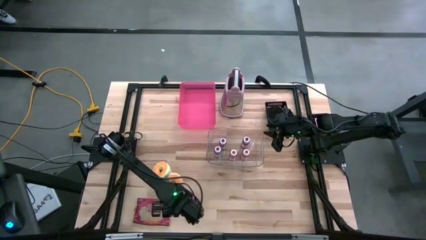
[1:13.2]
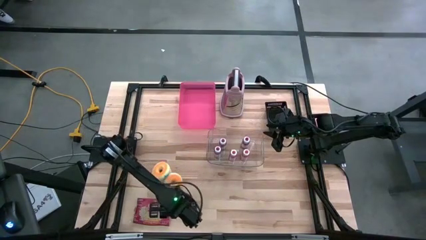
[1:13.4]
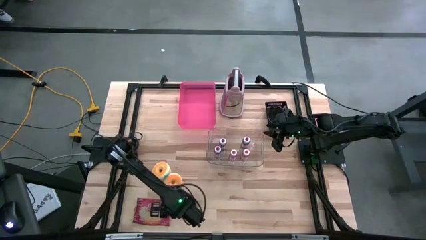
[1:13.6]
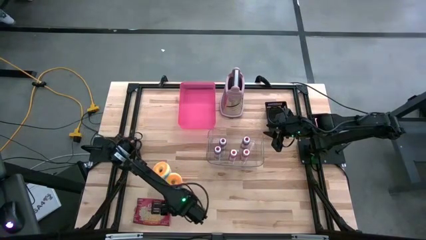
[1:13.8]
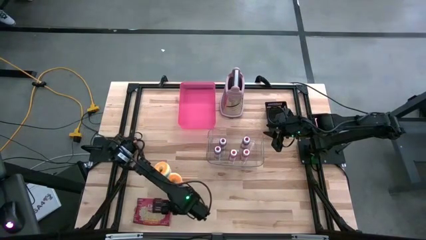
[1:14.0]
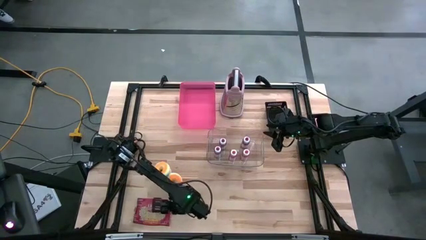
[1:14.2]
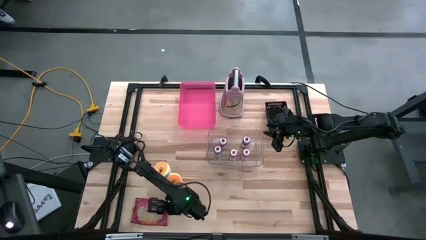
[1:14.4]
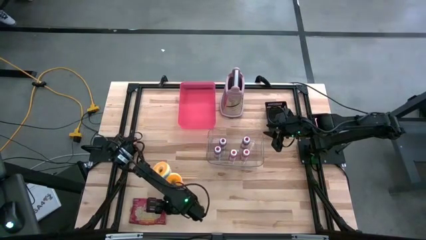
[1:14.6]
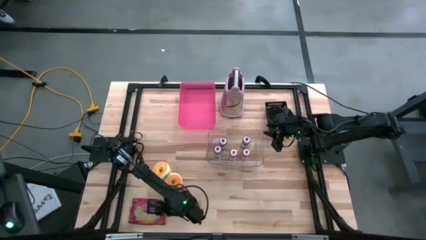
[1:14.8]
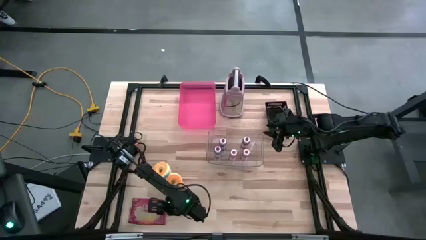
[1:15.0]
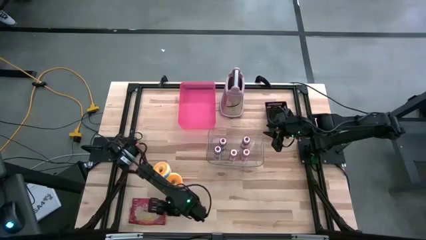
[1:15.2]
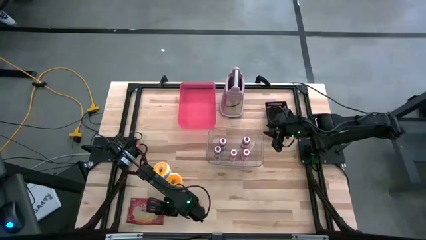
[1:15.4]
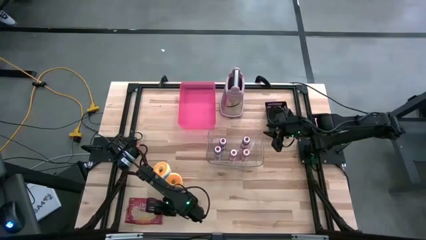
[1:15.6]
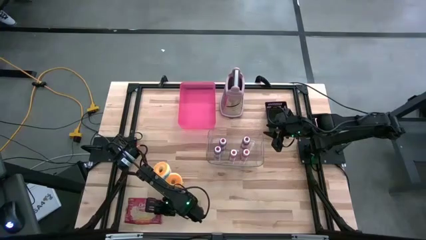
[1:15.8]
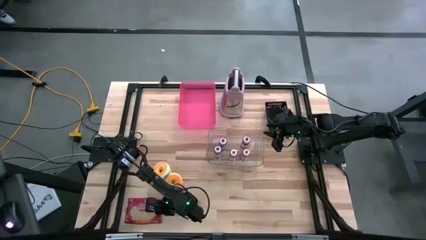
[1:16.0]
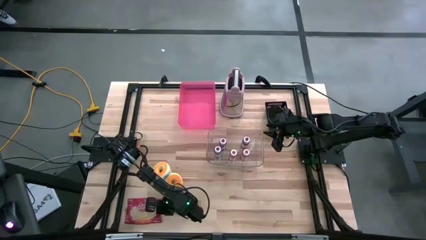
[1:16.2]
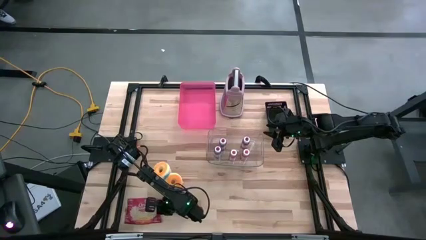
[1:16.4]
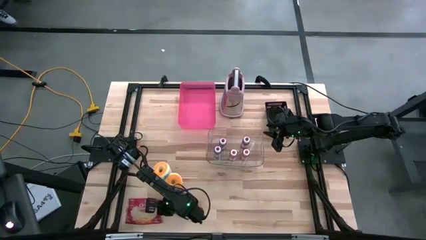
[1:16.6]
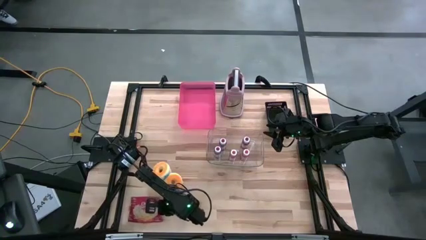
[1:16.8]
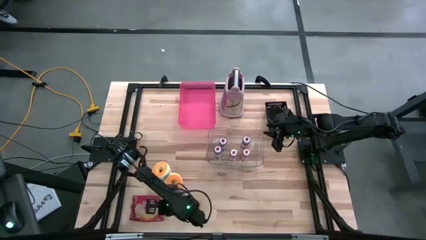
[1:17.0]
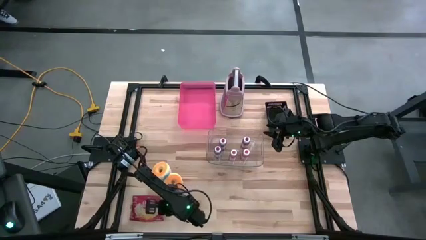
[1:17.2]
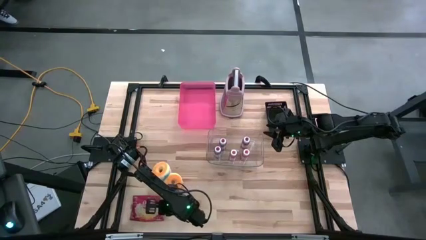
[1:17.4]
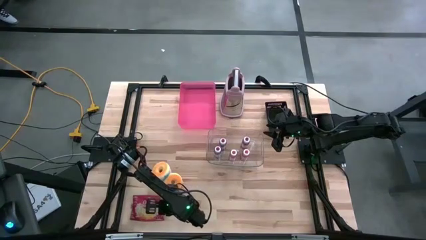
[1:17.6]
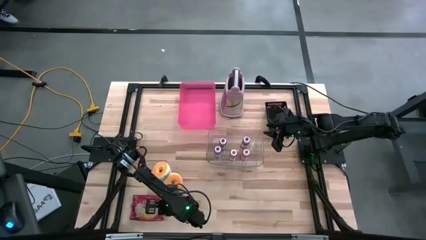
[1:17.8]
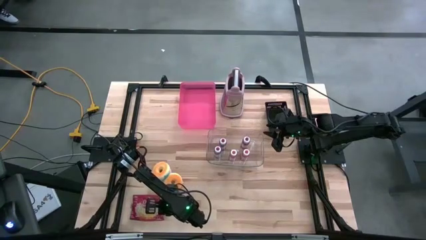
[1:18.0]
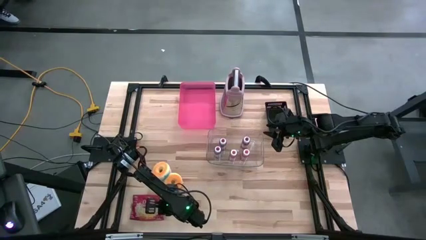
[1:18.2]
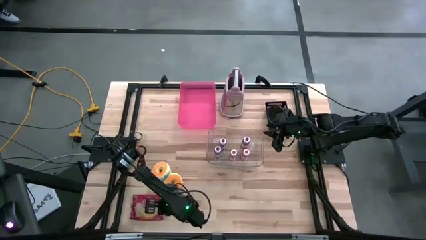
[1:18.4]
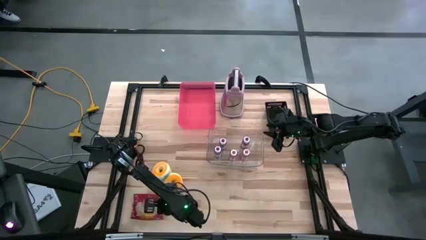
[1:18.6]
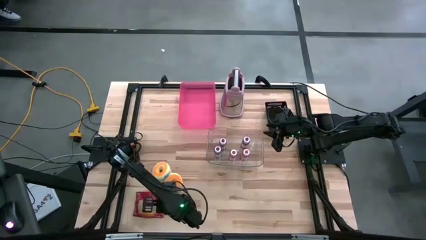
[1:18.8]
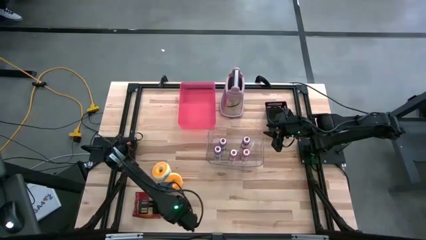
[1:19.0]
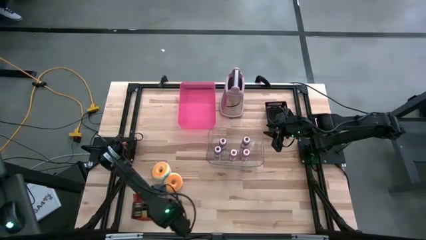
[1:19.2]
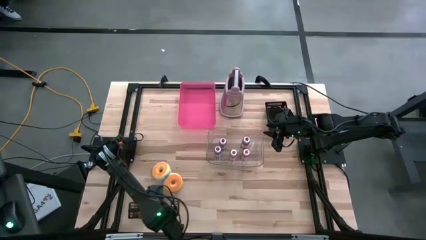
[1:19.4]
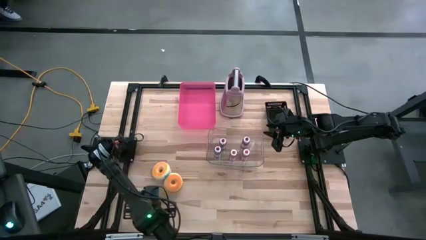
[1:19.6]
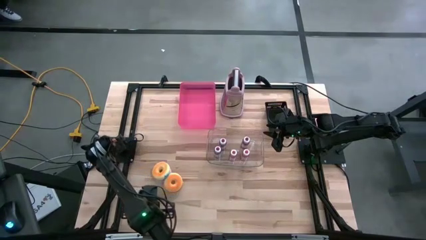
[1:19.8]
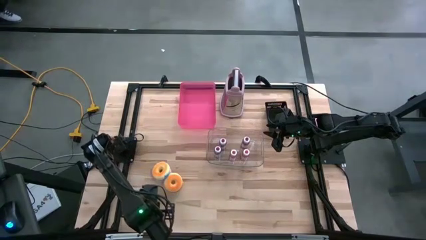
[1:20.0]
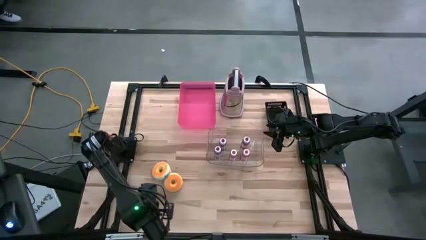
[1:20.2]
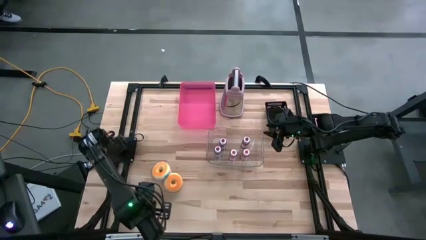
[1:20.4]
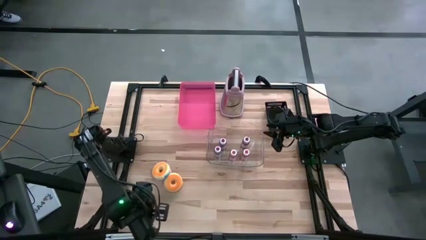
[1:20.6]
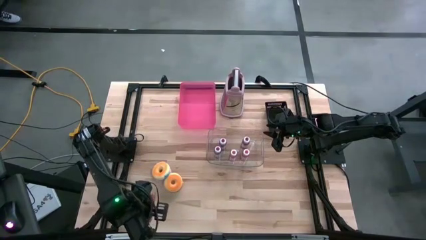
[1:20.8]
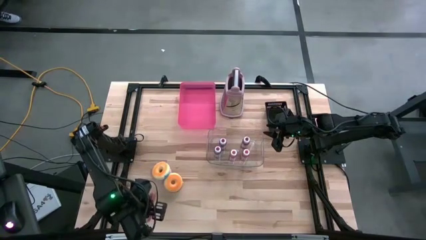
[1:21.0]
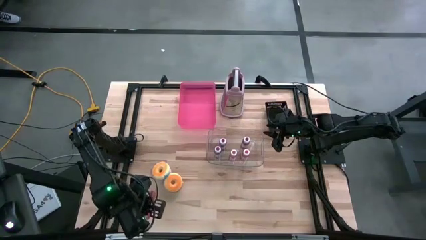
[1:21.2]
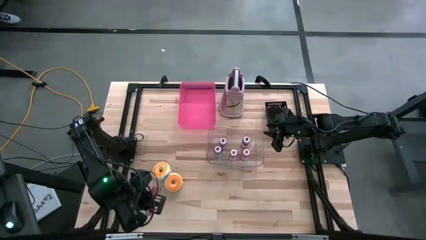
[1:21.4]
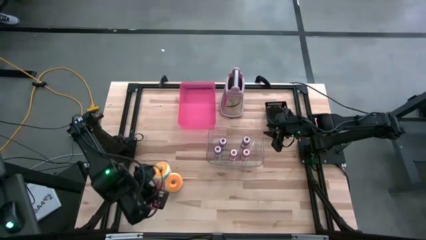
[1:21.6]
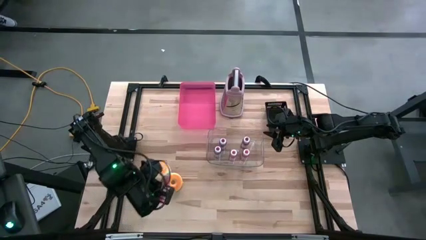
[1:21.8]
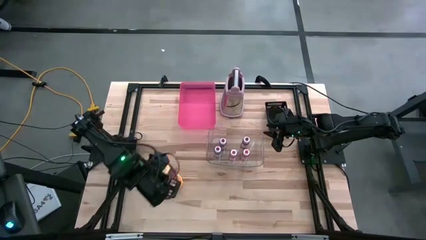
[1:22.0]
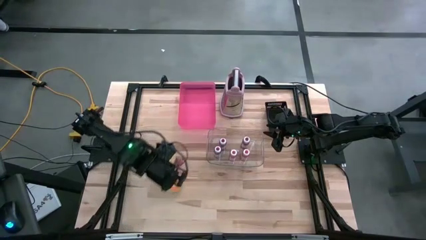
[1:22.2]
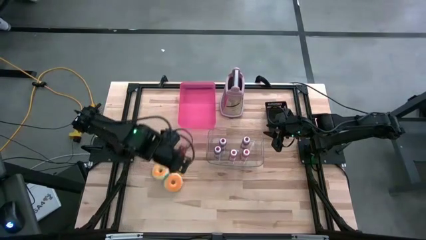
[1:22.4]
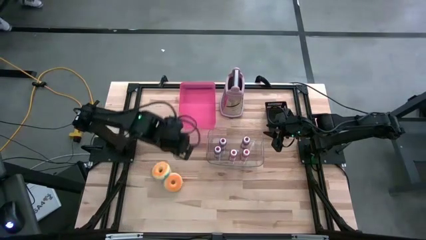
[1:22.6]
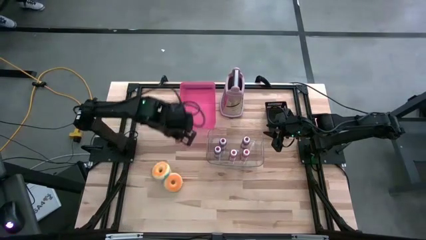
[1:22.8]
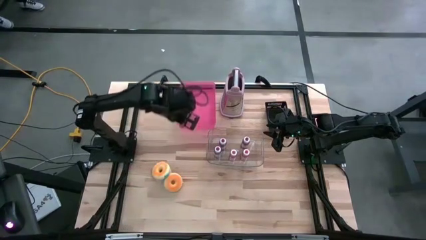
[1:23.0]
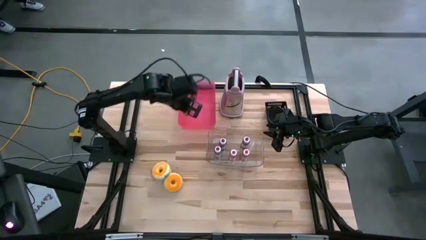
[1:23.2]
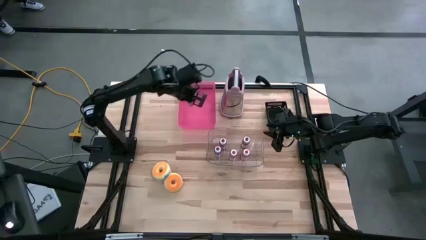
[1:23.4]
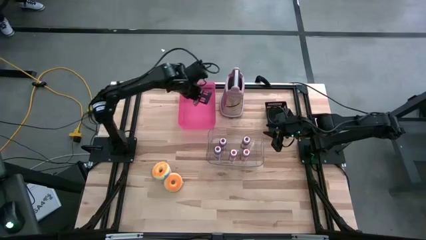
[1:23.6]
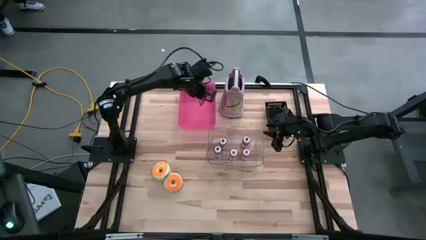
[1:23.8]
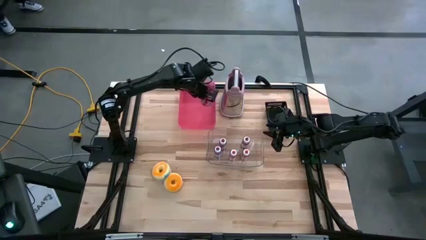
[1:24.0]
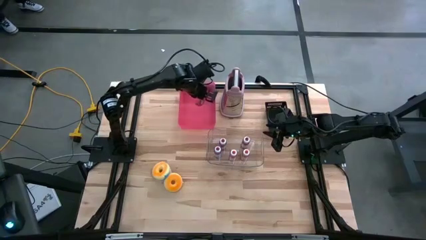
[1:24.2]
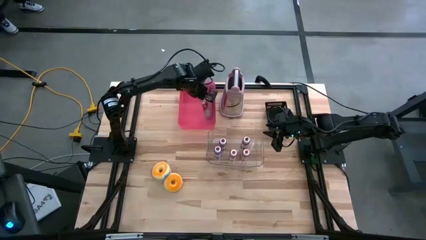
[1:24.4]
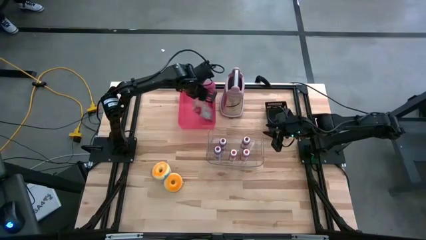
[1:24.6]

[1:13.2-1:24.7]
Put the popcorn bag into the pink bin
